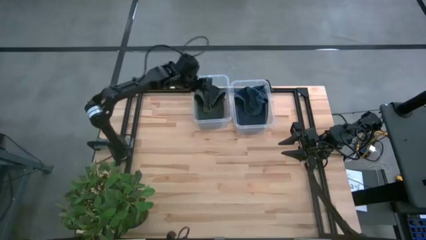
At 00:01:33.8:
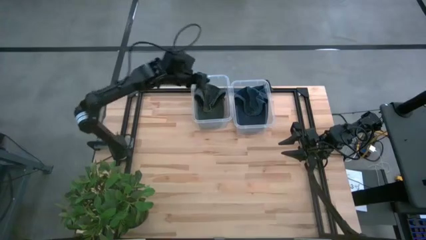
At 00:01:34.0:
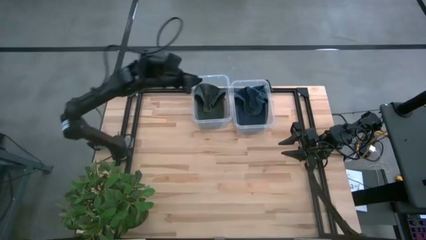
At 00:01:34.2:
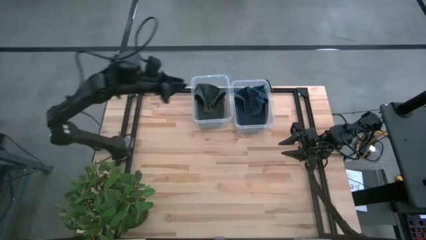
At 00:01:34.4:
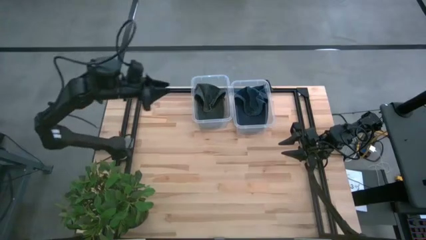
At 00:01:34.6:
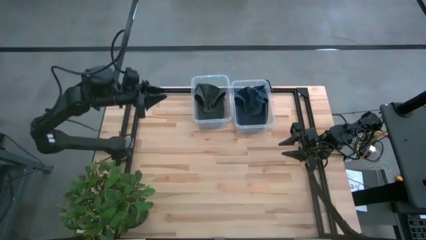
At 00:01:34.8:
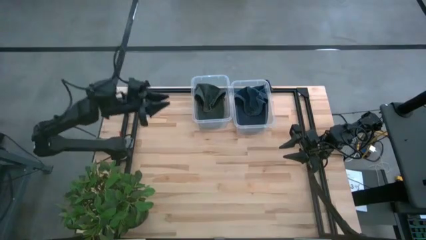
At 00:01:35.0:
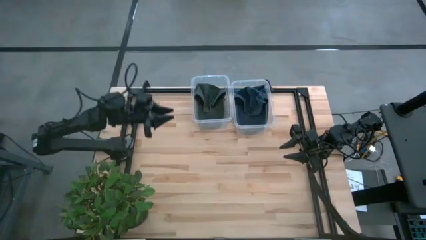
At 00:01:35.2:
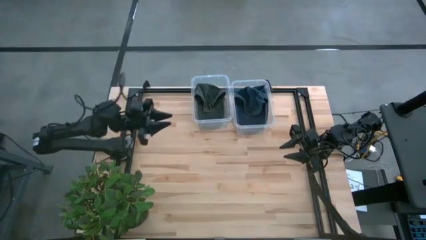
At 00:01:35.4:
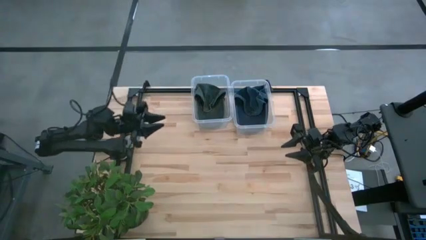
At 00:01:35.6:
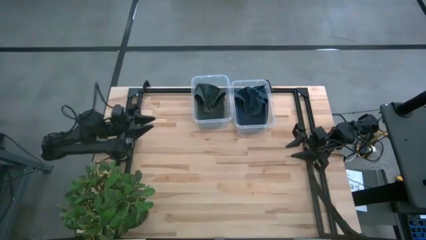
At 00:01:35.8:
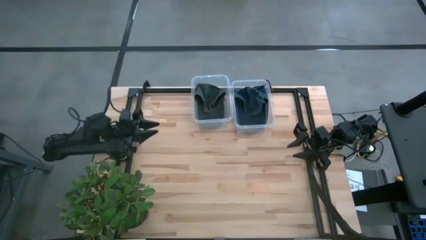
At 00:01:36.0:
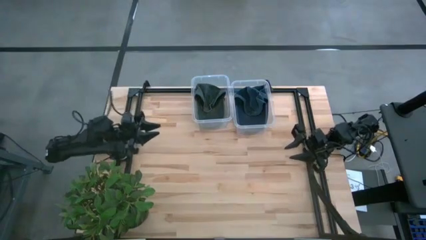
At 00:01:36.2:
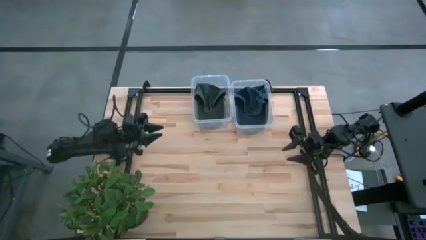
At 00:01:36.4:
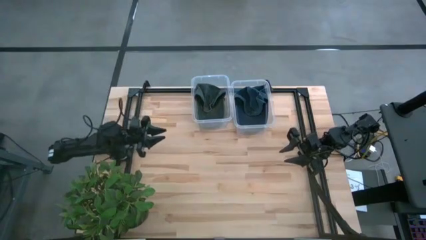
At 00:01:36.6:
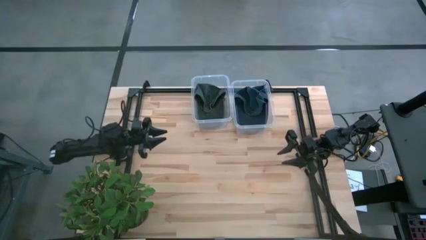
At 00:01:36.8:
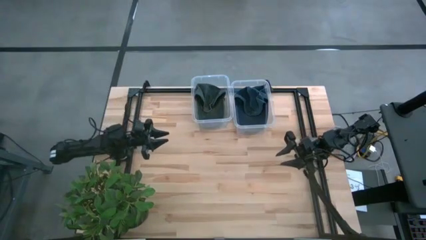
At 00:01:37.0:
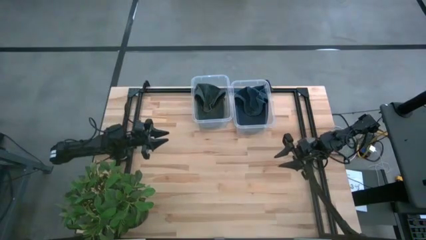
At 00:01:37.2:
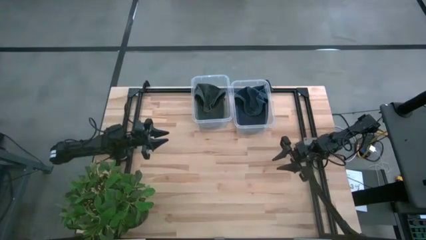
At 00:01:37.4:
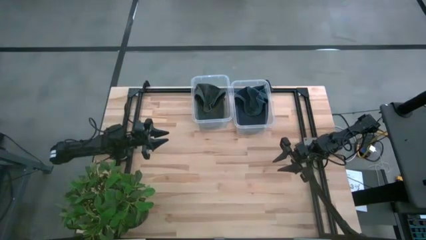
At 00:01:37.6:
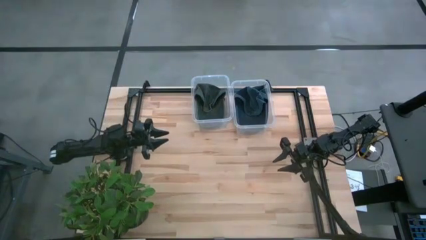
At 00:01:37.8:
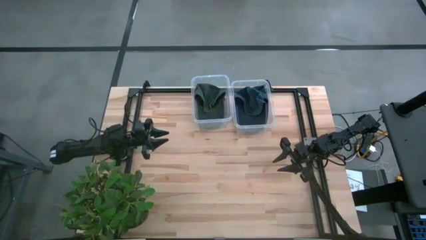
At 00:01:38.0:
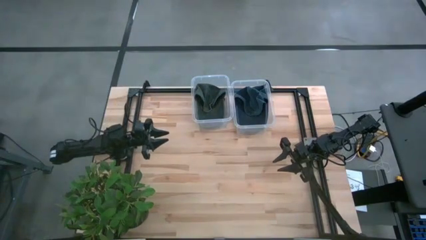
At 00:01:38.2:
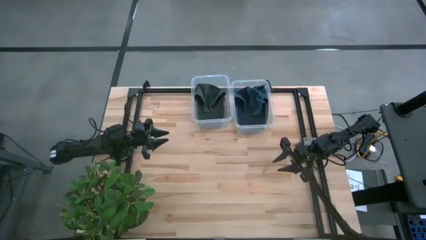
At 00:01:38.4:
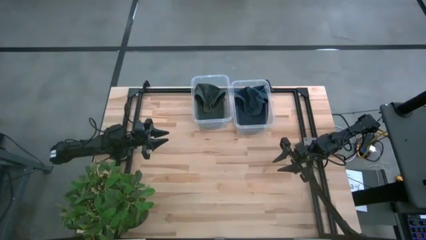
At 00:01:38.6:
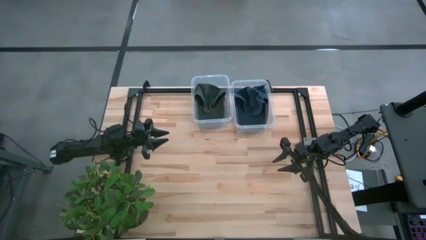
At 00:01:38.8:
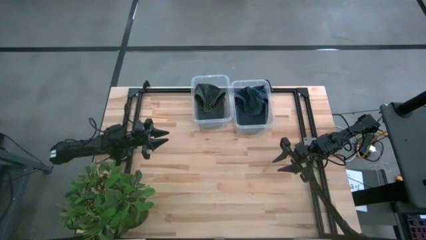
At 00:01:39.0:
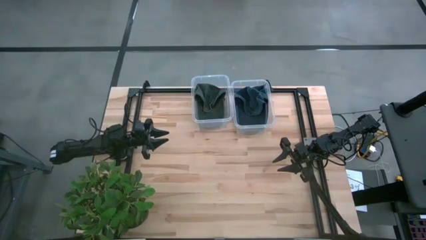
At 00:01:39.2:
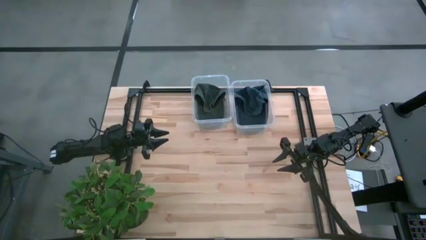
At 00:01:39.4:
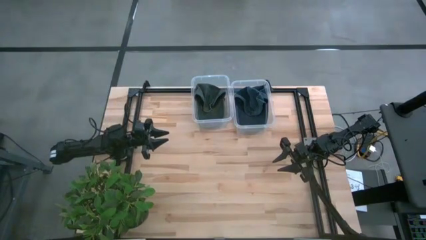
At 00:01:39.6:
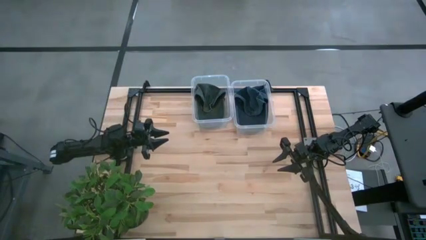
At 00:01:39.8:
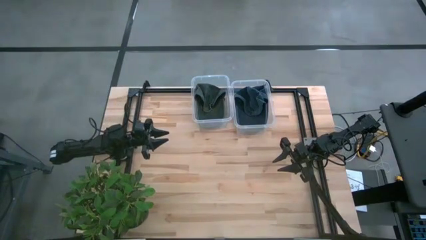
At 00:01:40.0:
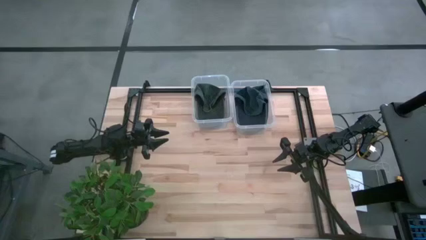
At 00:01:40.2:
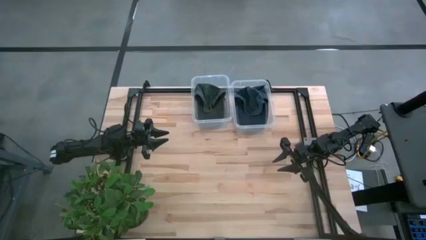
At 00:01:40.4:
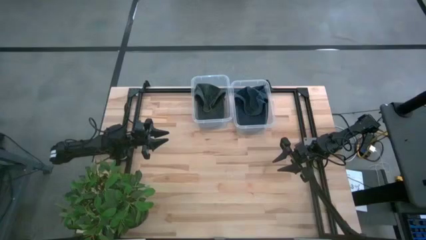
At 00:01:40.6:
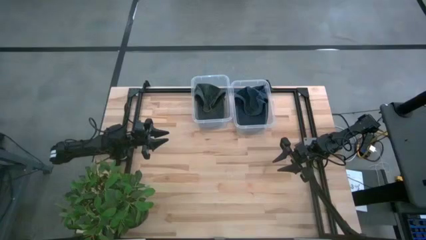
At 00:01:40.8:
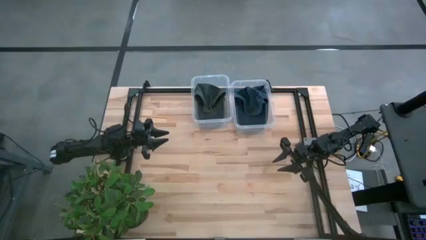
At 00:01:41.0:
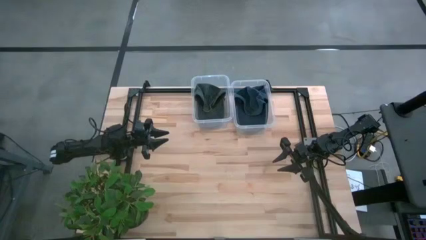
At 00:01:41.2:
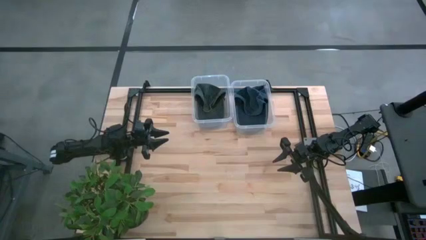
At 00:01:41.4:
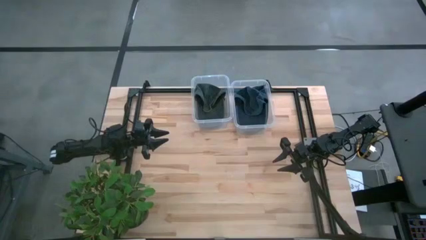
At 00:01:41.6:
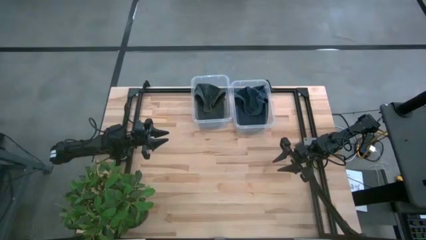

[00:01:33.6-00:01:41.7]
Task: Pick & Place hat
Return to Home Position
